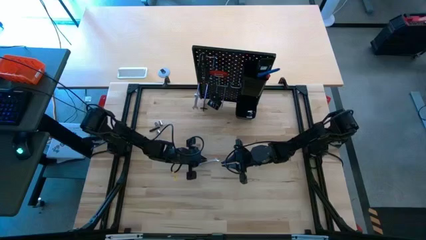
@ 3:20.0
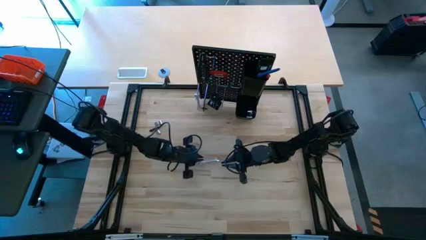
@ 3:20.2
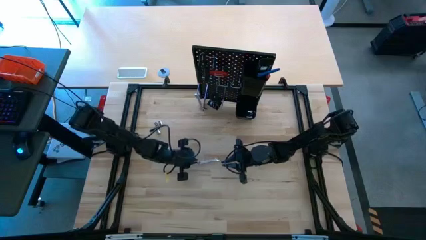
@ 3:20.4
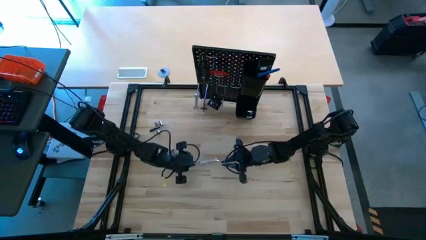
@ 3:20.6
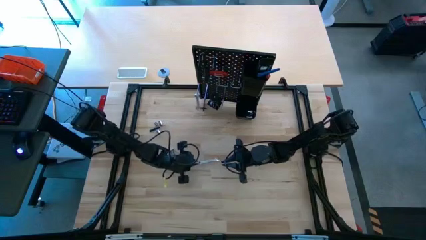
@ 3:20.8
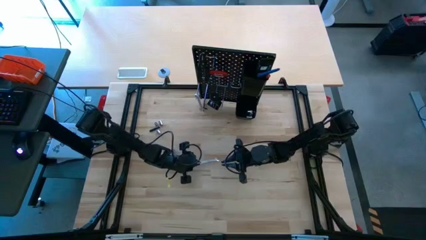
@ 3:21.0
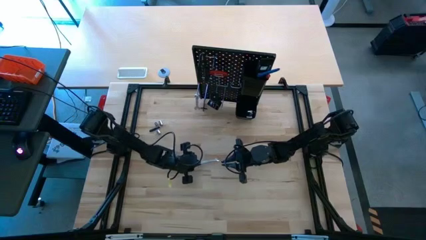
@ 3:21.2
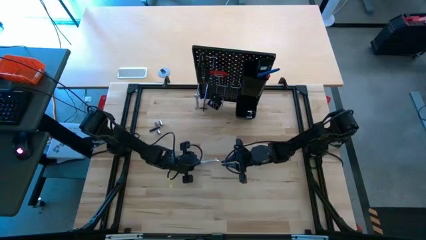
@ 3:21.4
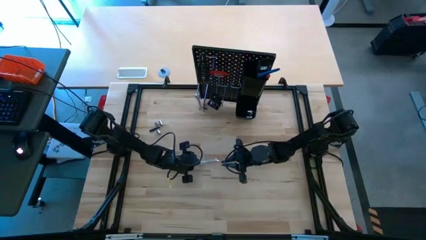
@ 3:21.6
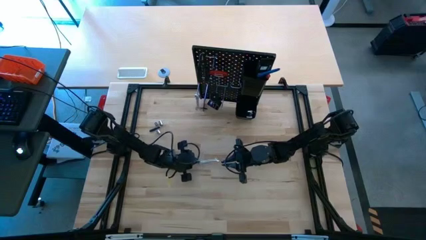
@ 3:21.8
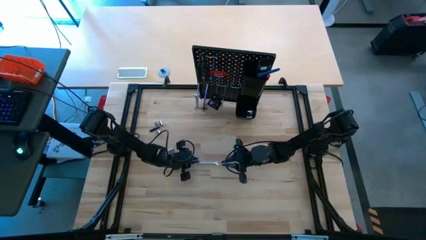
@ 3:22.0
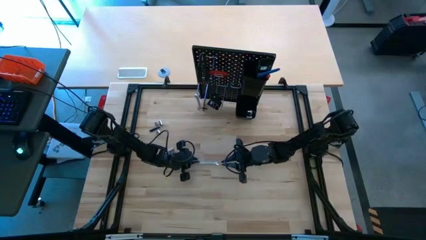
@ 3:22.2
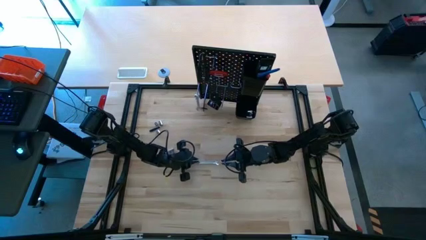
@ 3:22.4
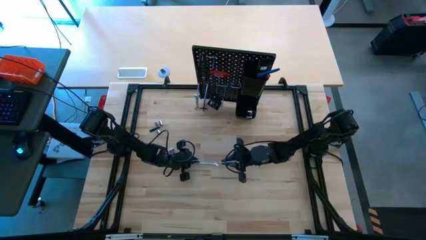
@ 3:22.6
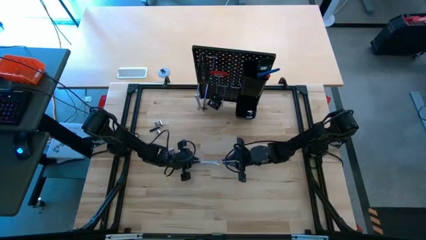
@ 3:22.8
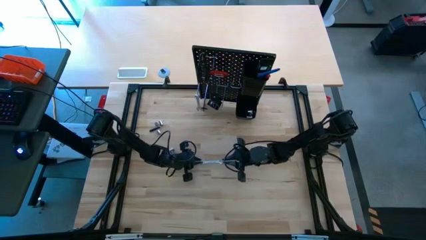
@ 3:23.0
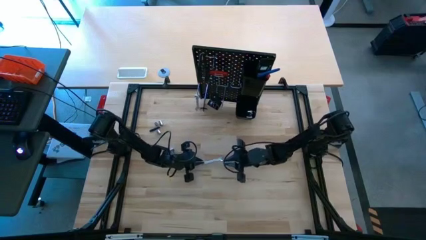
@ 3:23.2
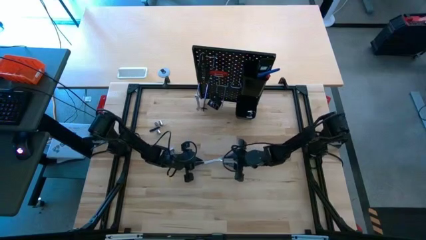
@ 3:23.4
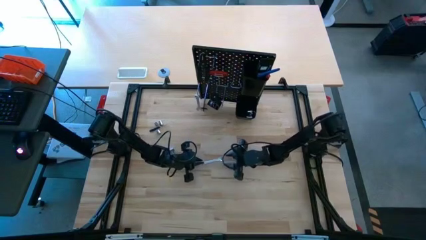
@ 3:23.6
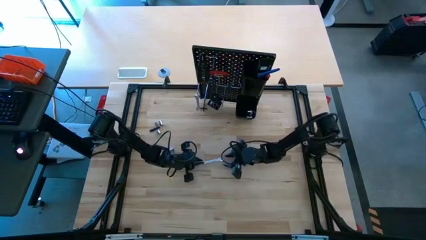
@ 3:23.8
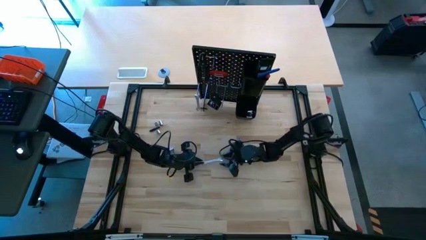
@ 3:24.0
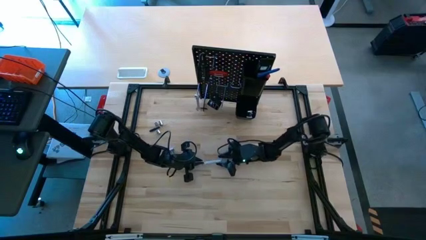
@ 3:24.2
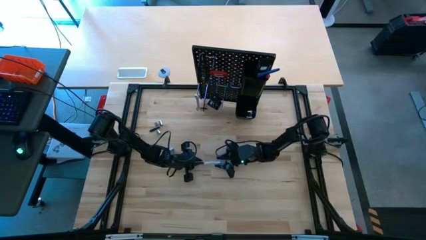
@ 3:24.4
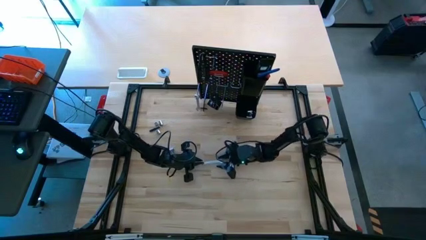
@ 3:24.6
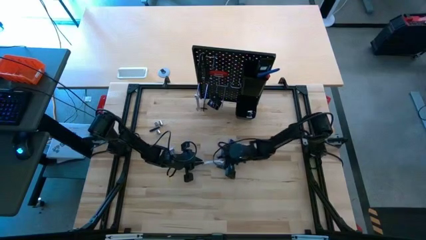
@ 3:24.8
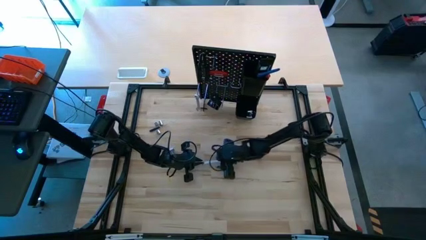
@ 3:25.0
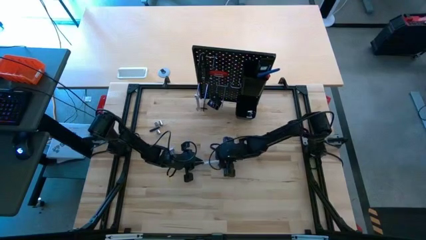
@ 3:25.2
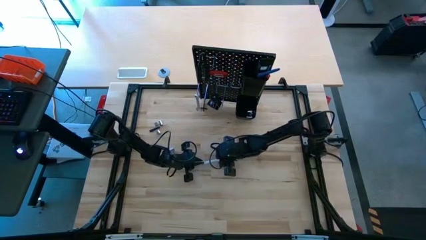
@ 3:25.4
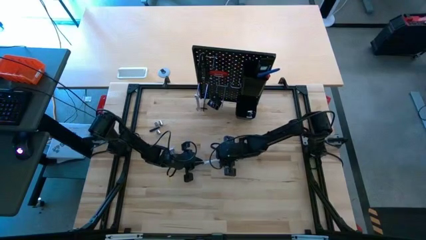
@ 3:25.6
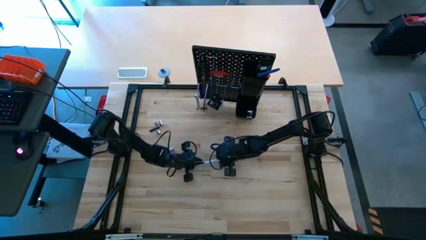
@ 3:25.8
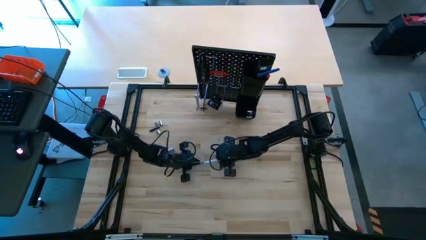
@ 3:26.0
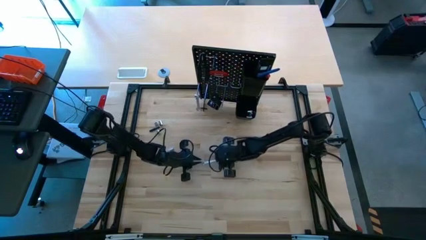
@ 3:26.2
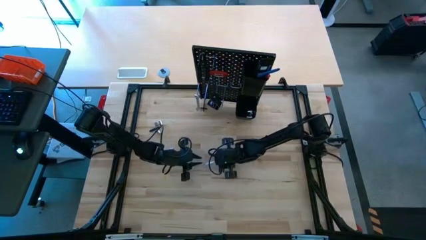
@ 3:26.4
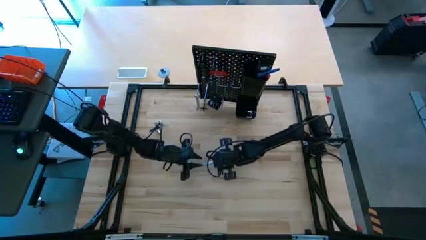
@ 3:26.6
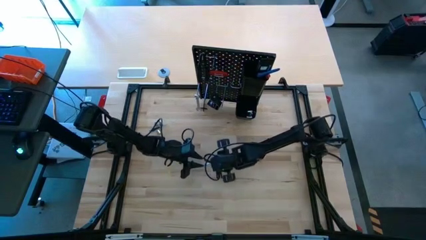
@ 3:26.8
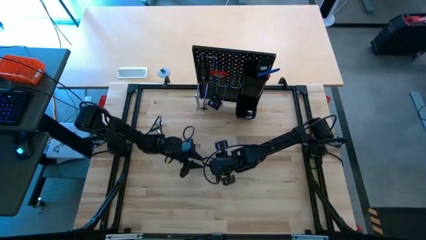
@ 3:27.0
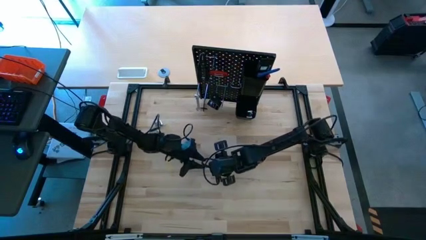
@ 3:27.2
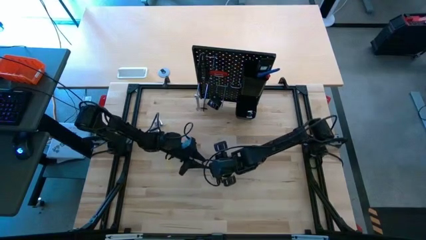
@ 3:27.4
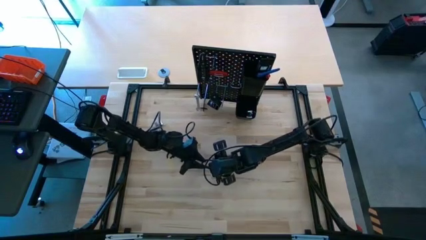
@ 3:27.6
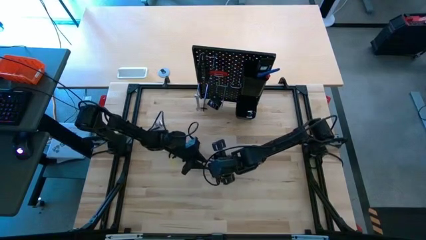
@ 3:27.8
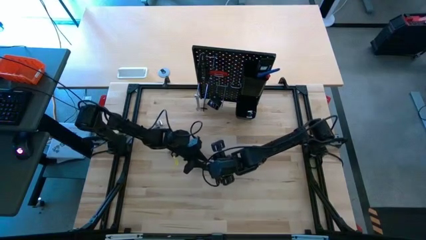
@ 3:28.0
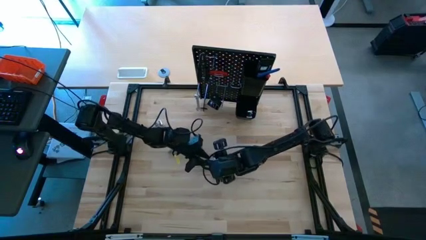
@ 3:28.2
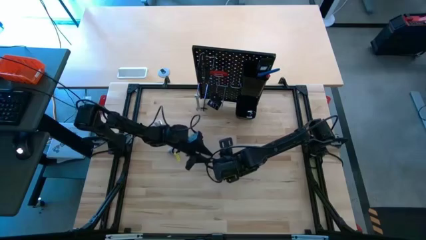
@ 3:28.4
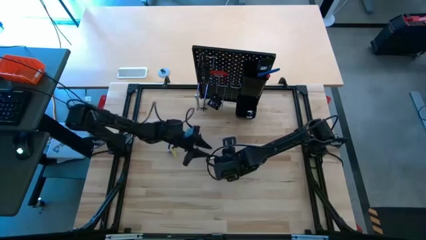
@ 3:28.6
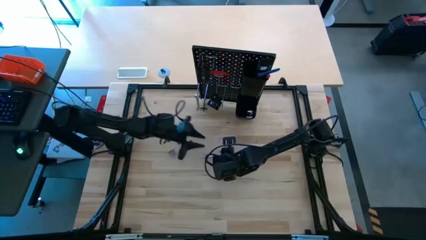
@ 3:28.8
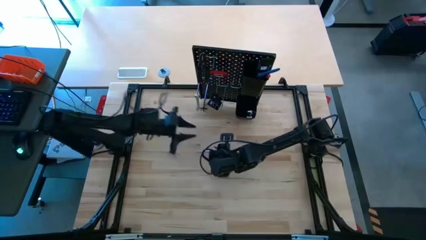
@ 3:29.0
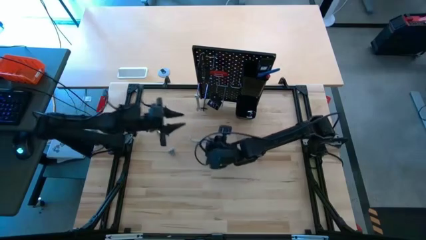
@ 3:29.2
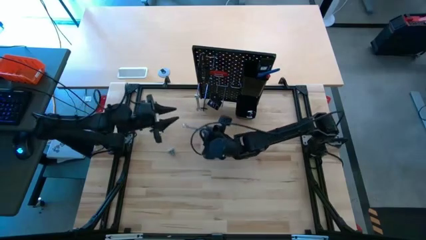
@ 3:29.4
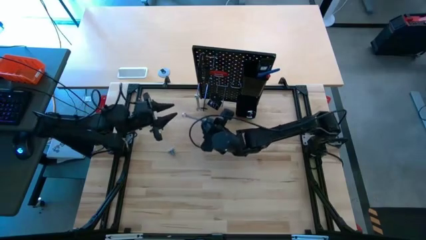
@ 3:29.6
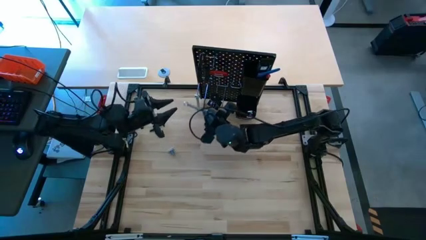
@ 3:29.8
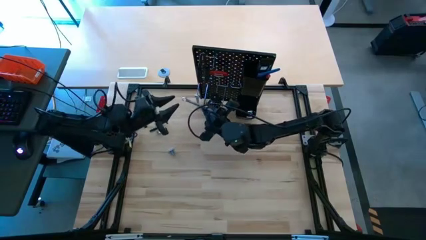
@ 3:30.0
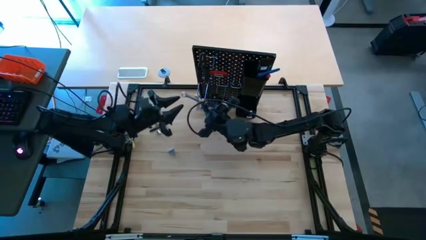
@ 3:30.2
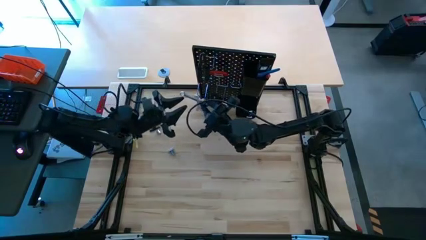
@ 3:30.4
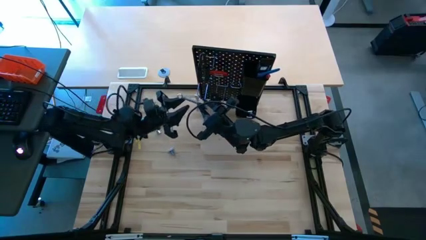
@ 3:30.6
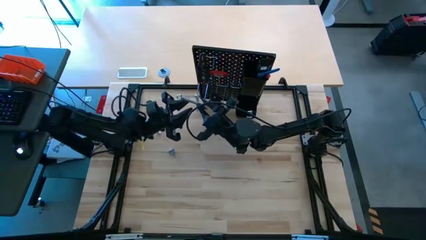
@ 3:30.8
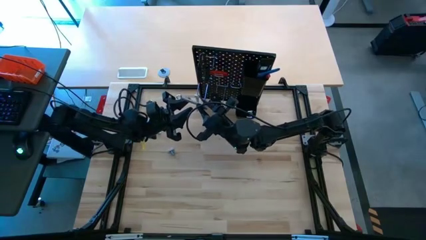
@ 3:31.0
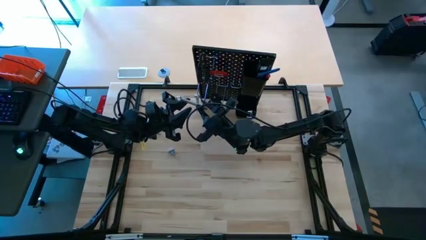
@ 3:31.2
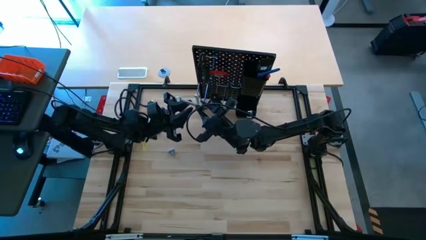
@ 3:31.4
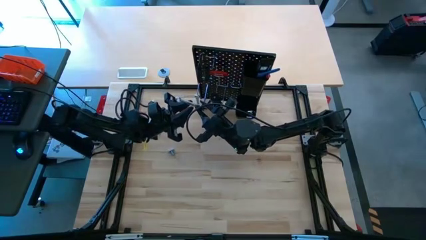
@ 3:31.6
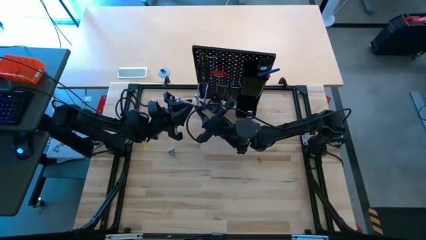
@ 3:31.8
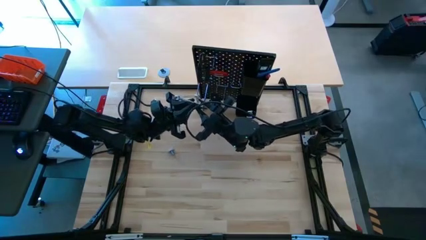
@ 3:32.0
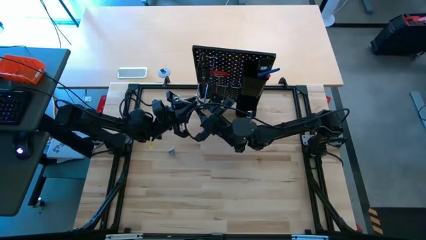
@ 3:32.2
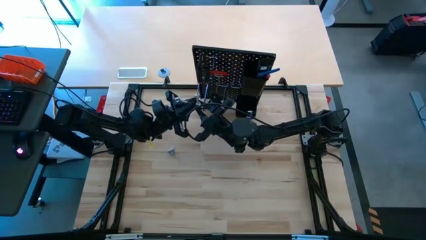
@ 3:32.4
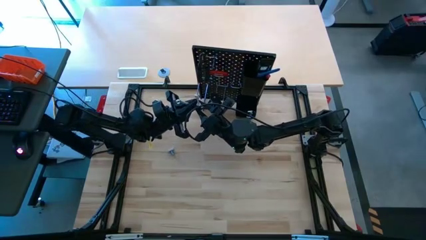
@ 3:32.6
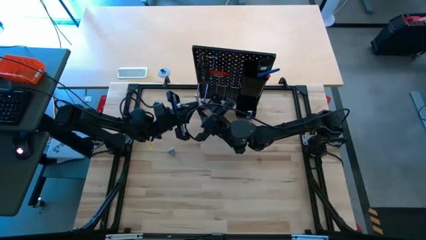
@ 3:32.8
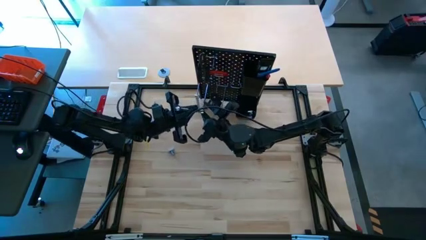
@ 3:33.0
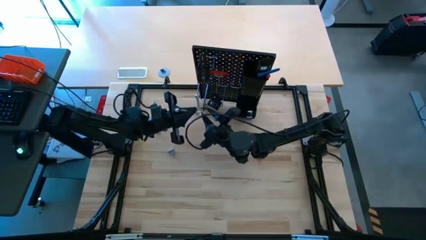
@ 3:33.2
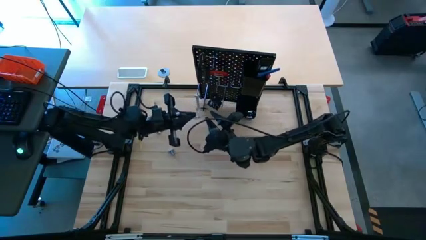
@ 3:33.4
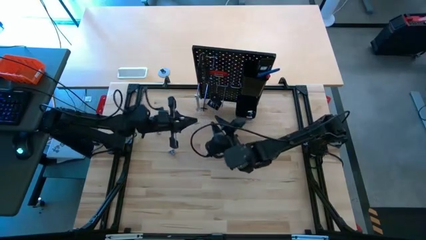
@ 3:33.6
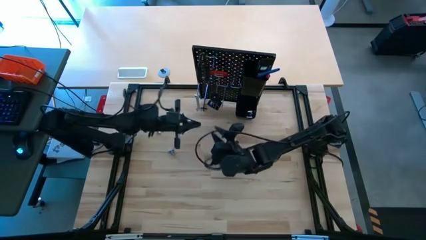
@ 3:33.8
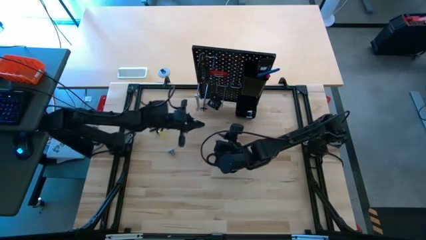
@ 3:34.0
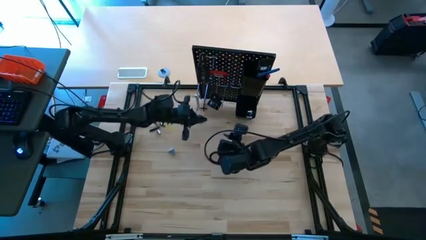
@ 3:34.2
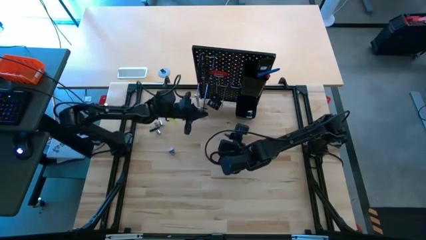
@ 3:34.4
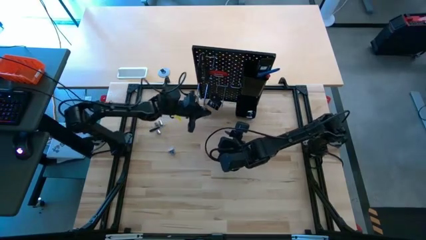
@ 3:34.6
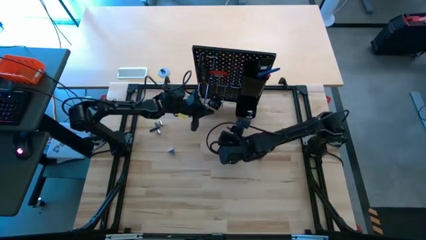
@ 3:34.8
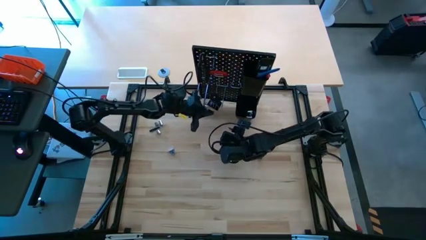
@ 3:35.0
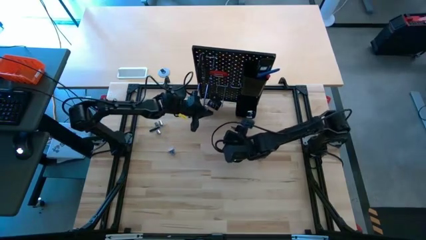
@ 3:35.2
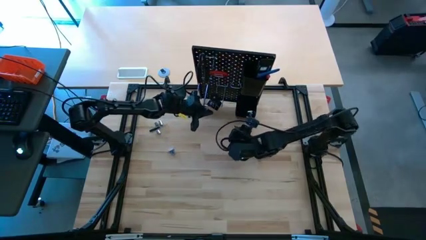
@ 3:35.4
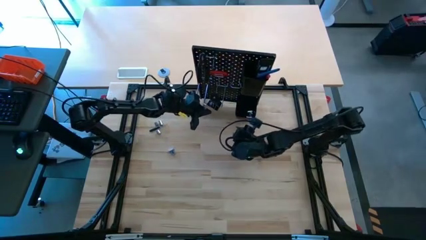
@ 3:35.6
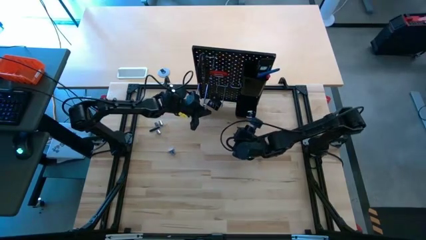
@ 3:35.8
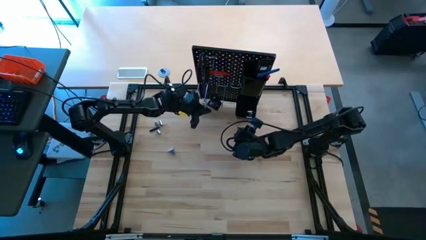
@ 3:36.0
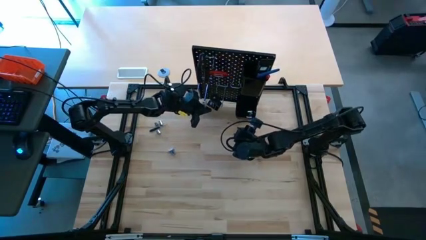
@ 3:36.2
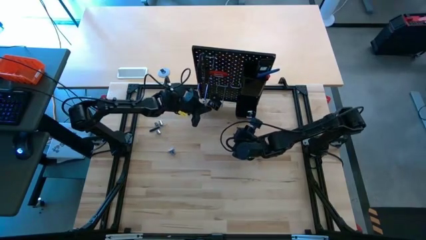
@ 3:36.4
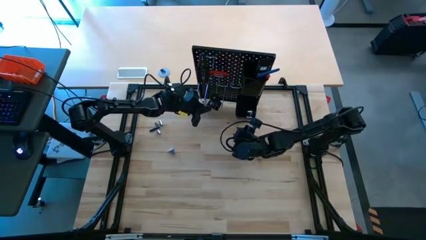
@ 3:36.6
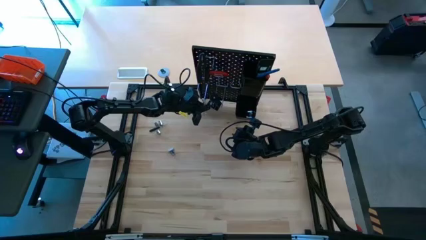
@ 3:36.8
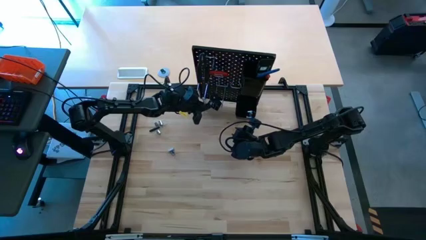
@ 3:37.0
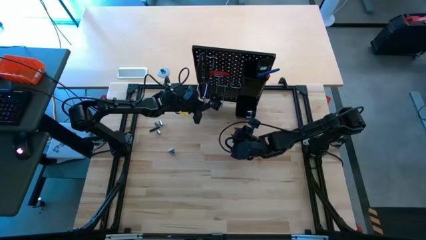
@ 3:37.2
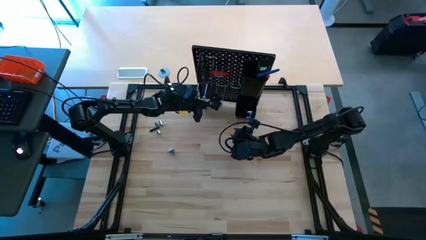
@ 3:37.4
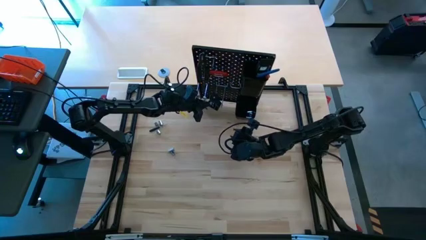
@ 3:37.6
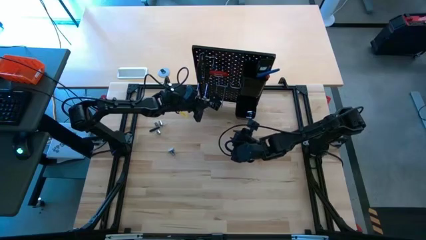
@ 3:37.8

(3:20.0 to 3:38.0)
Task: Hang tools onto peg board
Hang the wrench on the peg board
